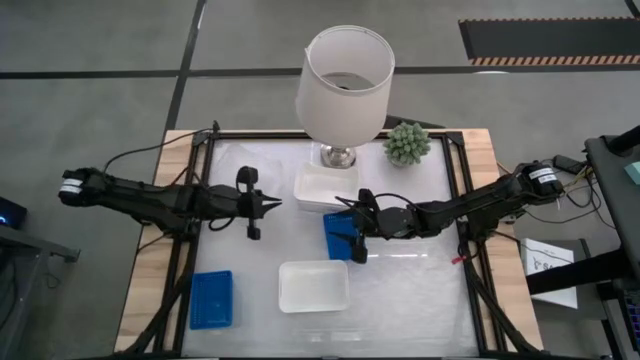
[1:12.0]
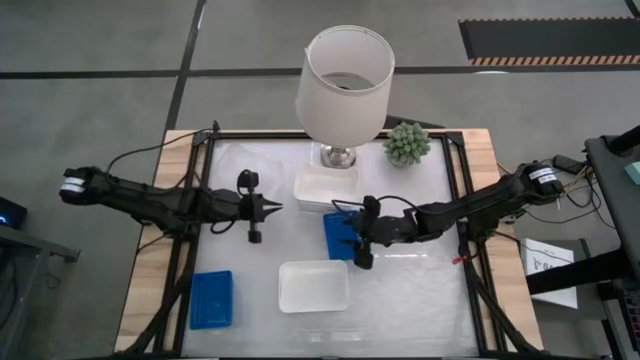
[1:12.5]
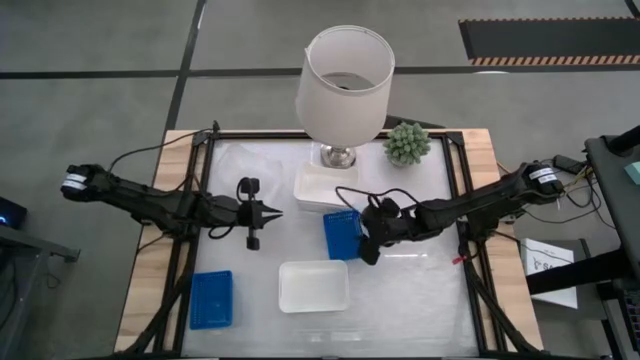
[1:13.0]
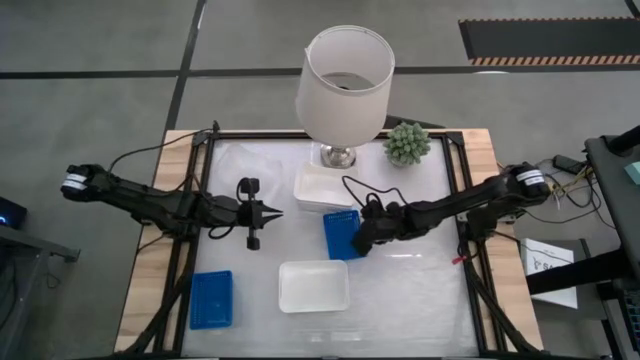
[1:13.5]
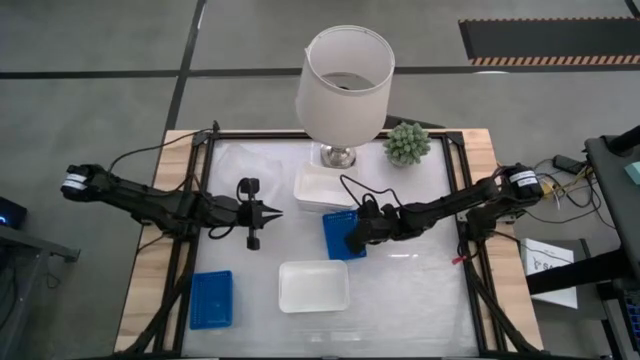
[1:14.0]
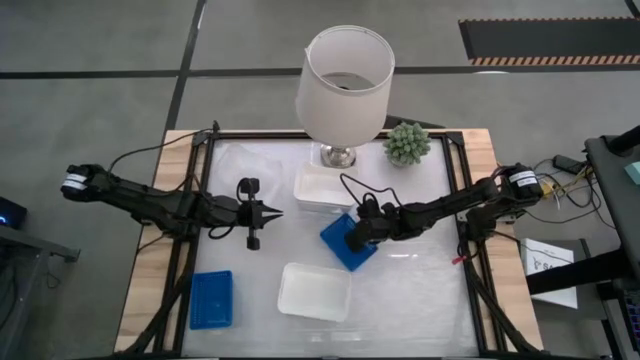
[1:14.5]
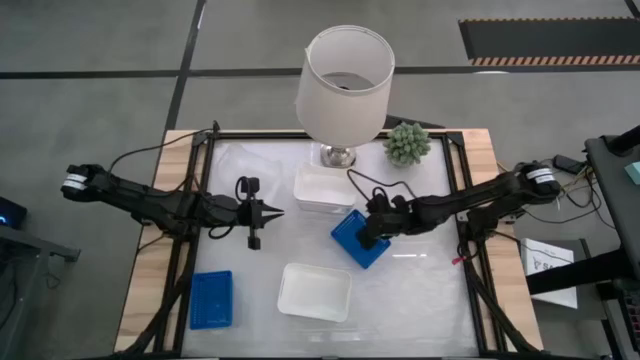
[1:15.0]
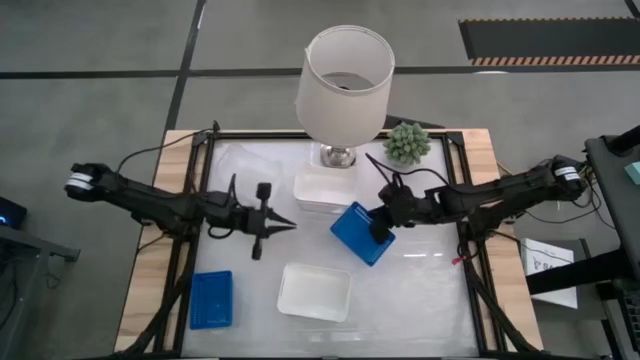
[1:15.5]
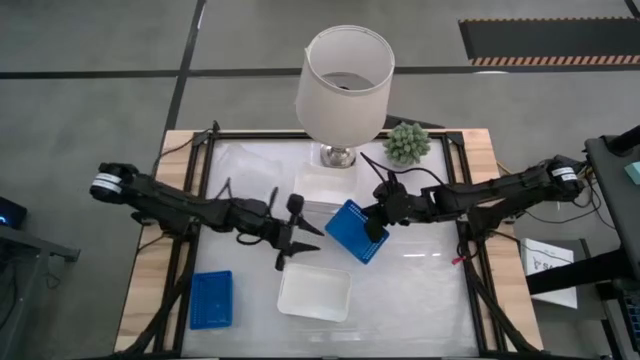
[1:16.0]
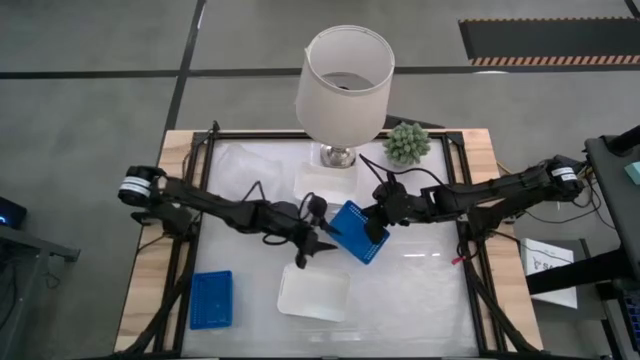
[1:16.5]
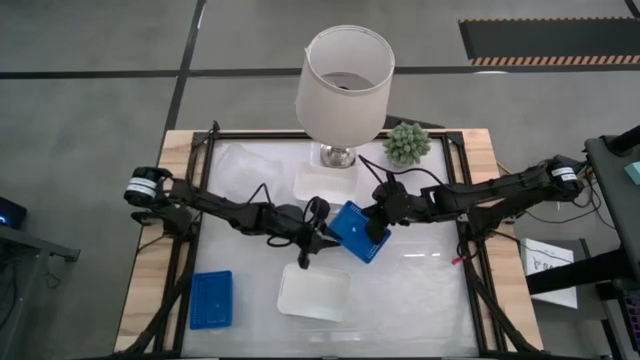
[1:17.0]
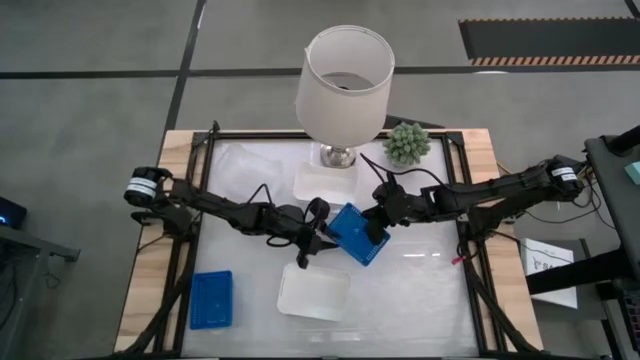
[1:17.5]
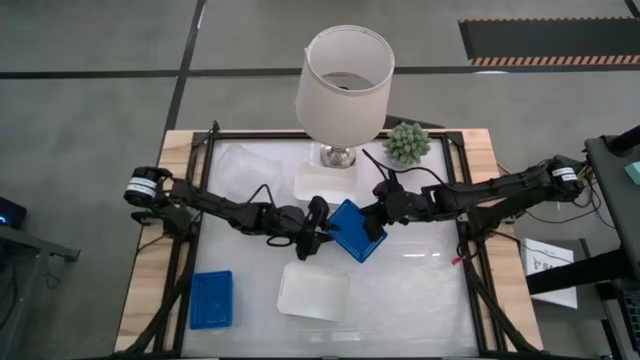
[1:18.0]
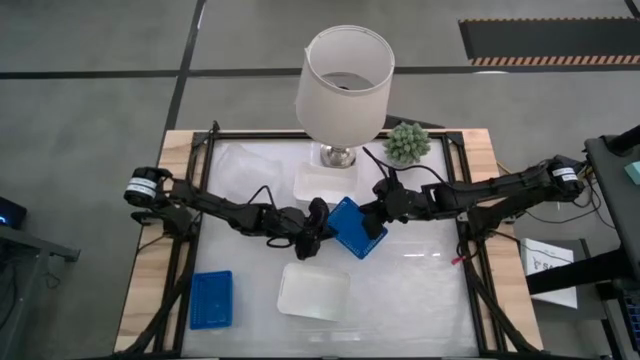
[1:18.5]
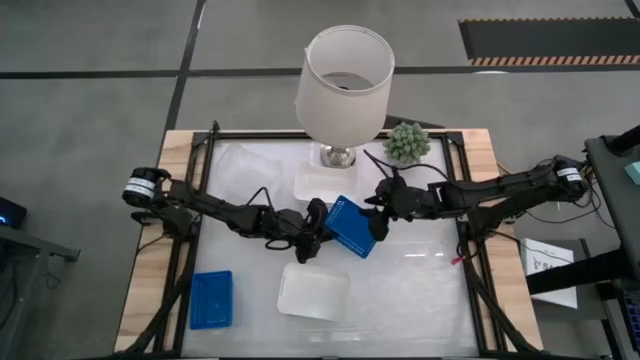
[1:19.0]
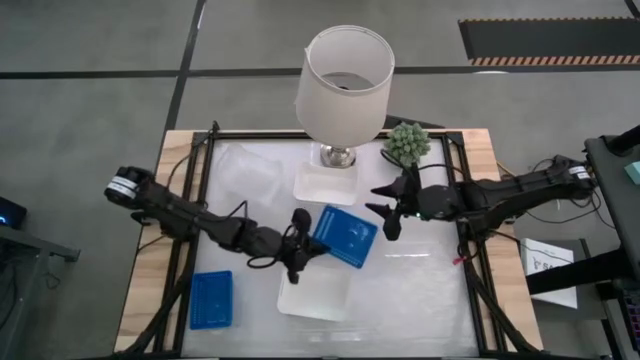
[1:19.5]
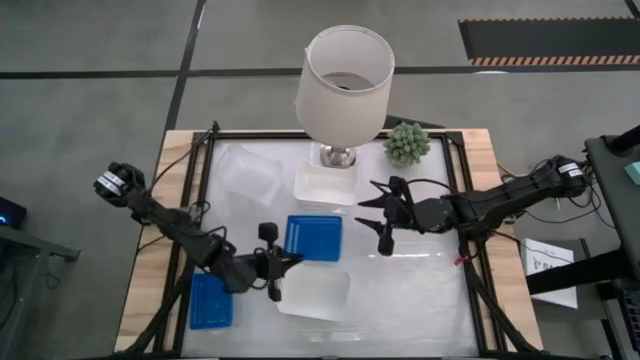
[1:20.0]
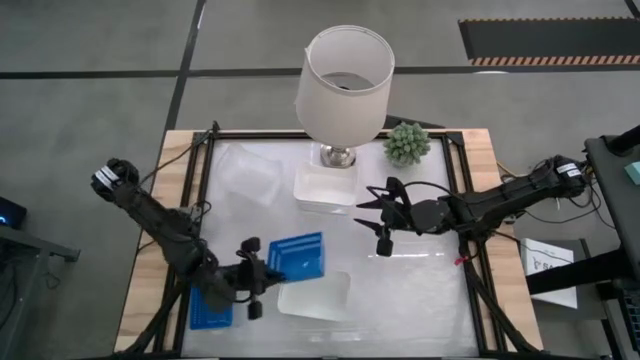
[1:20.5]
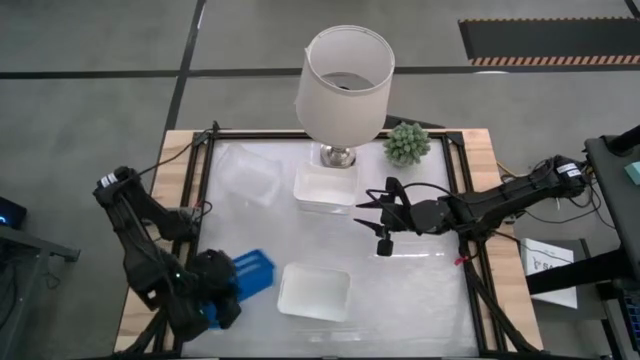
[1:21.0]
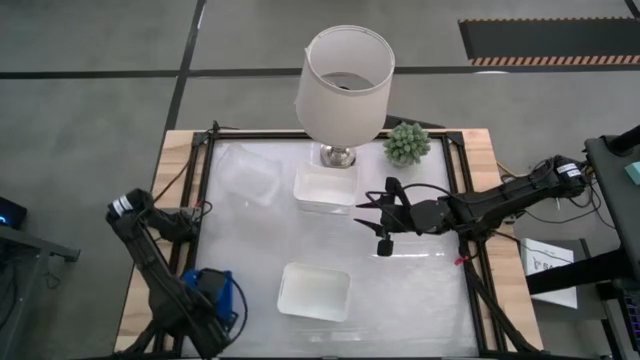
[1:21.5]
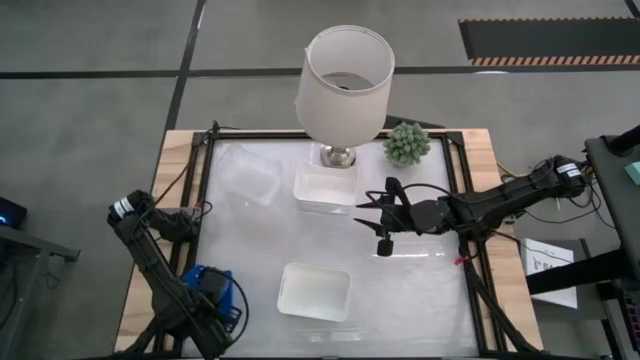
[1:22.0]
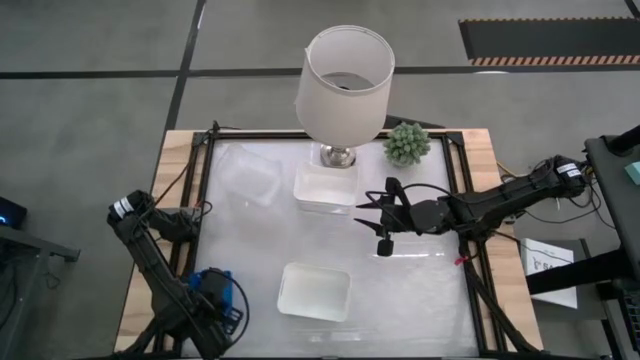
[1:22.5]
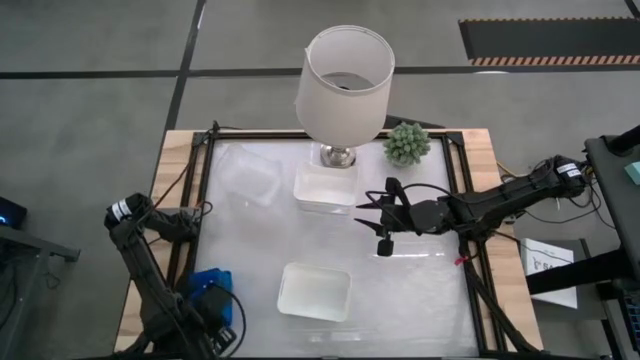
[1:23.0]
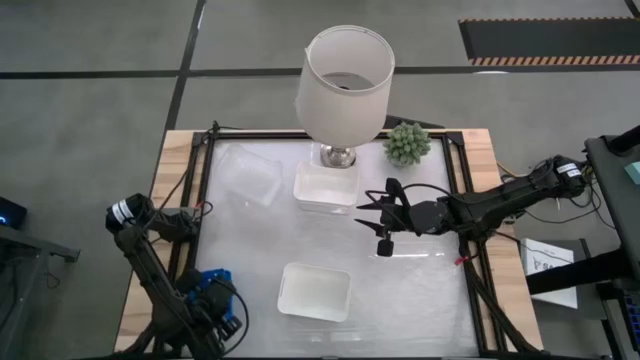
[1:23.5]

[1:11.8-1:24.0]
Stack the blue bin into the lower left blue bin

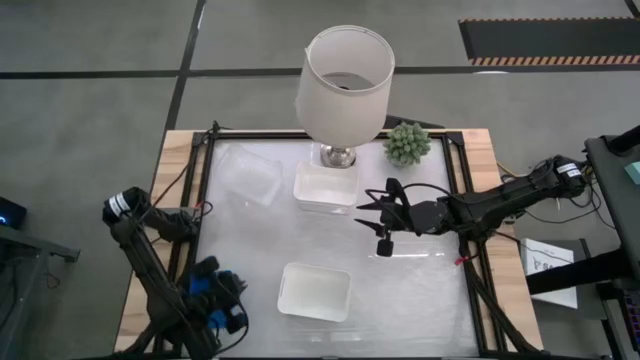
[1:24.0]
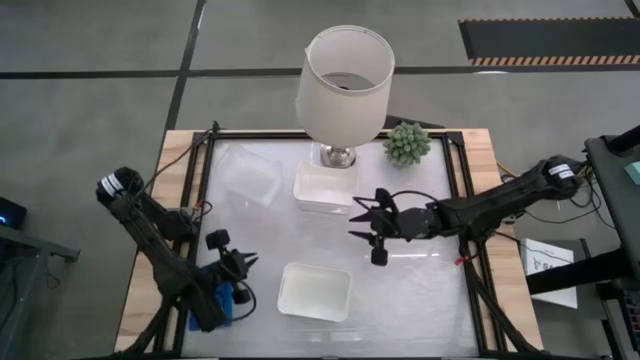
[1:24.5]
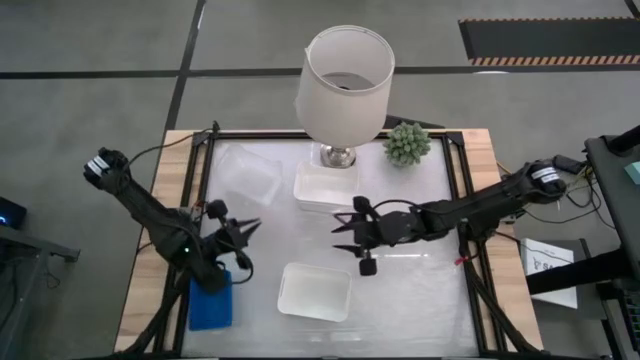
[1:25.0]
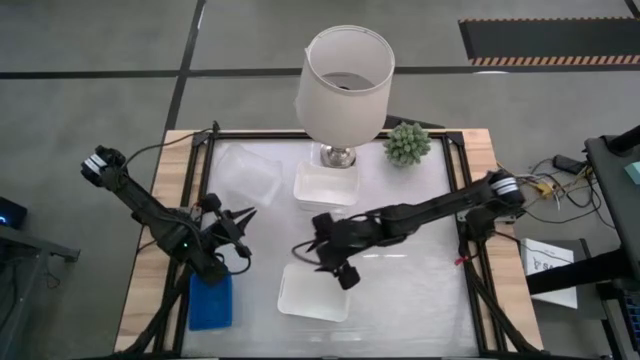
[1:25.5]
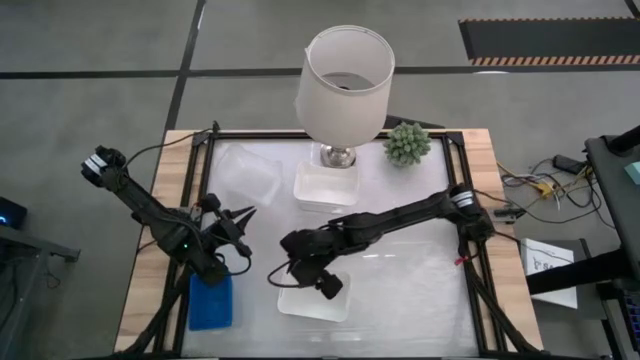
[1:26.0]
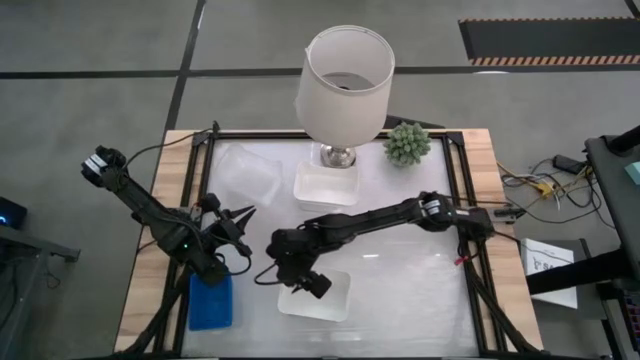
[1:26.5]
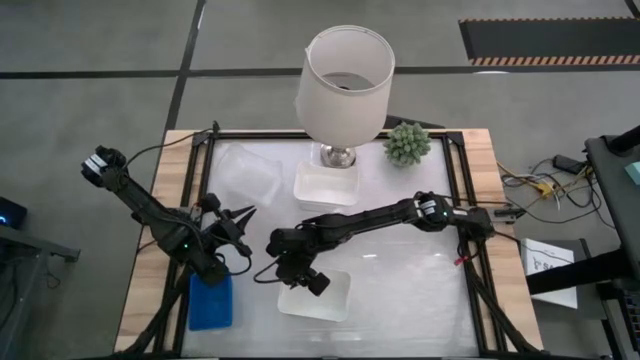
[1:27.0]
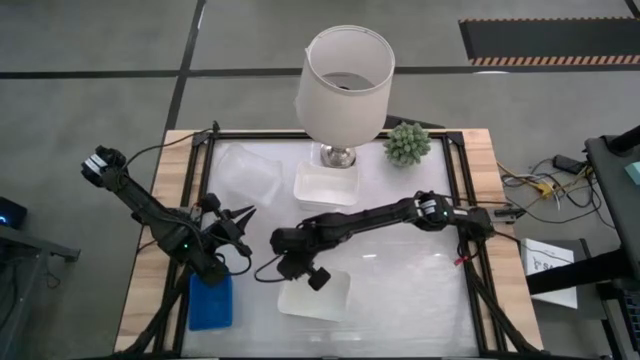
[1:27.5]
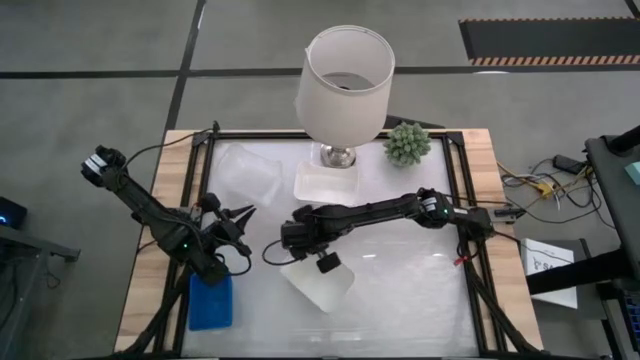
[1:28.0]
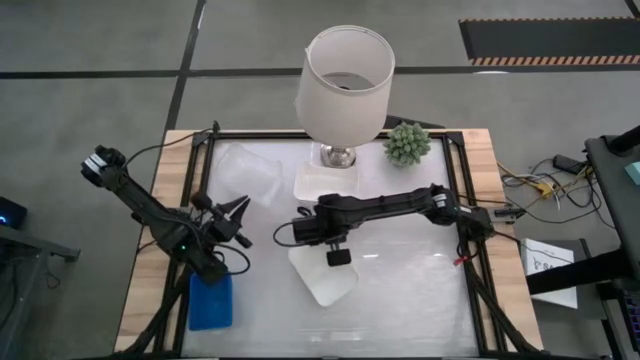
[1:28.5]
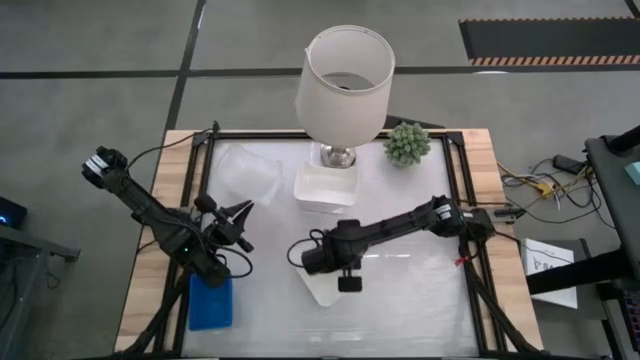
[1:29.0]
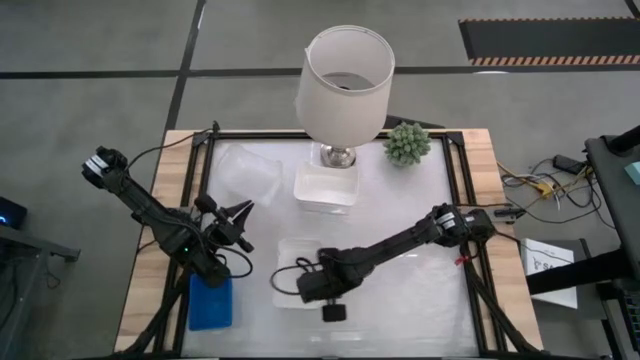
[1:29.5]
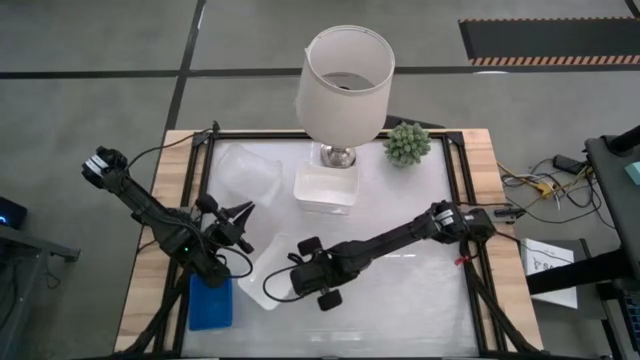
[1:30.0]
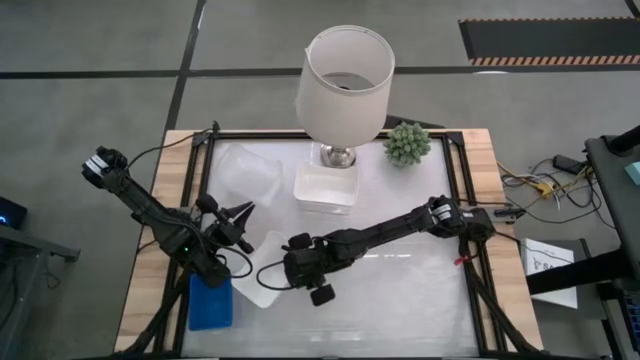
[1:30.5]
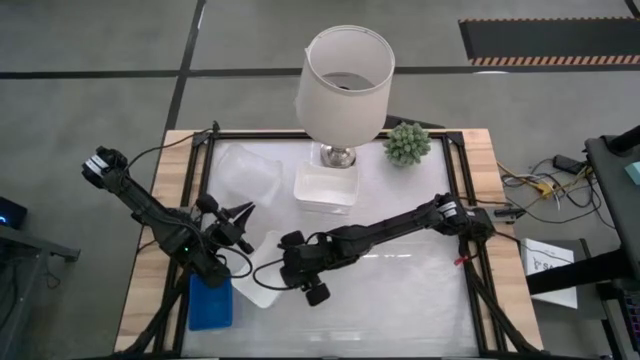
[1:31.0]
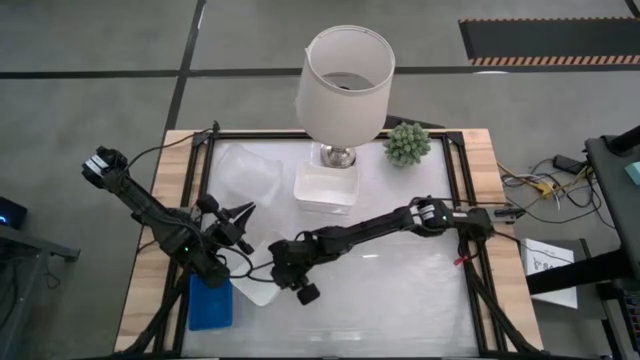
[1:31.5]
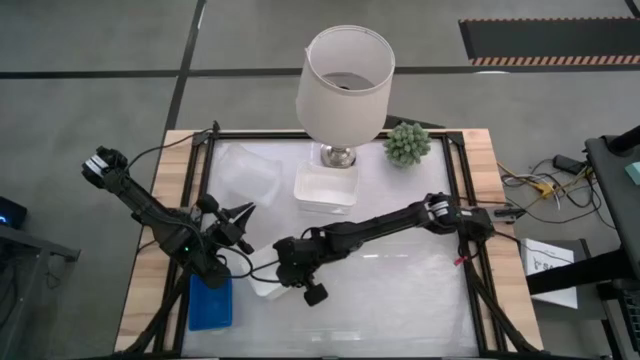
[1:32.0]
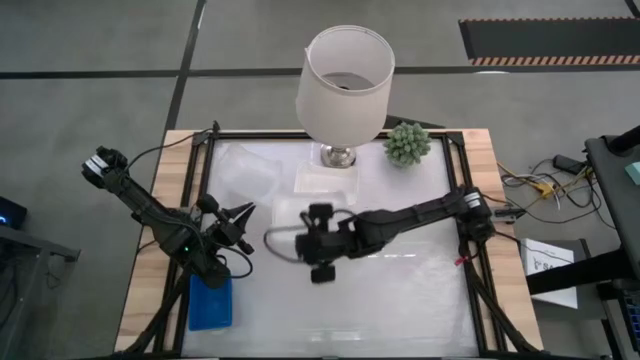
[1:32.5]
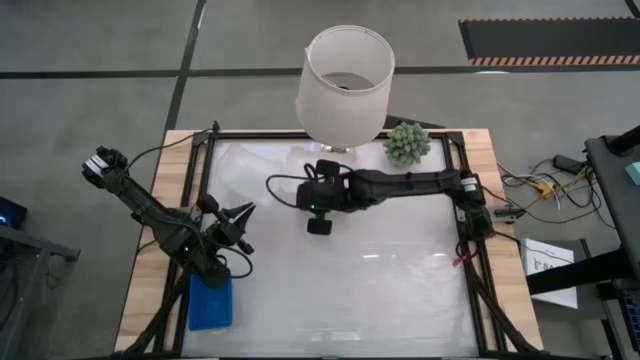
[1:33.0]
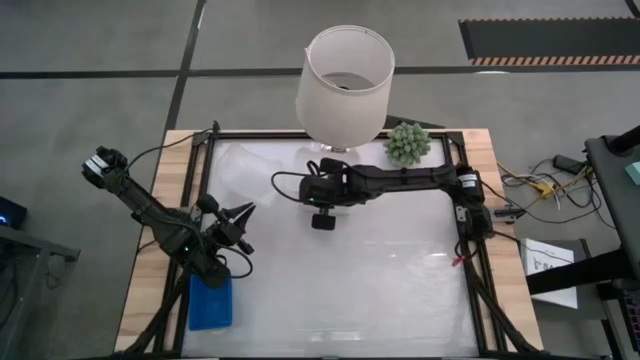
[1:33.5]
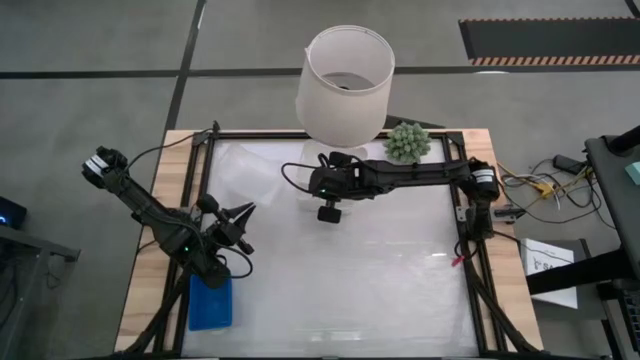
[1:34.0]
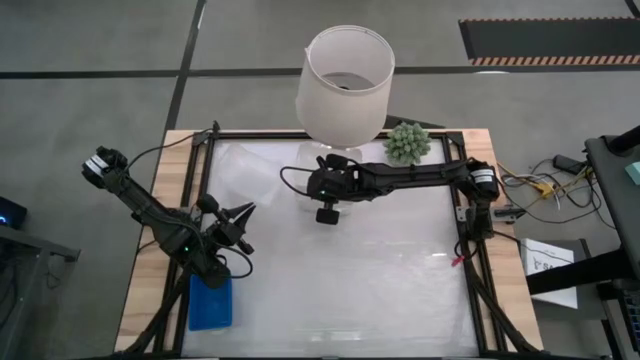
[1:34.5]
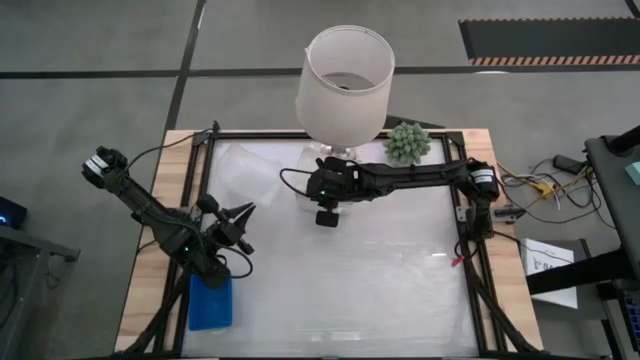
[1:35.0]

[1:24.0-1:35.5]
Stack the white bin into the upper middle white bin
